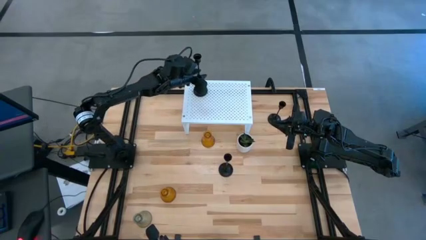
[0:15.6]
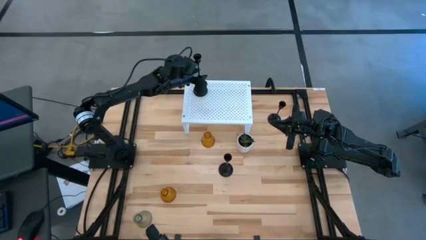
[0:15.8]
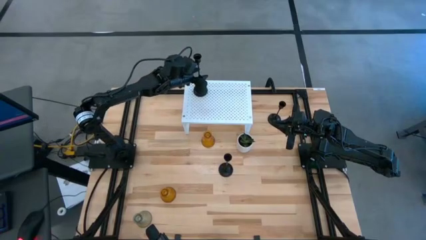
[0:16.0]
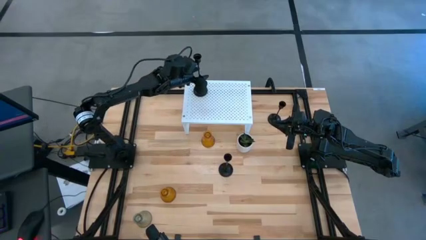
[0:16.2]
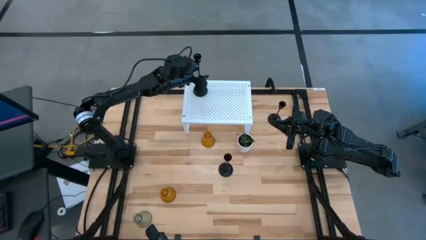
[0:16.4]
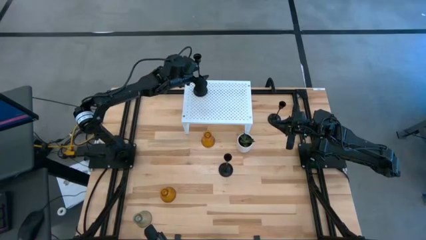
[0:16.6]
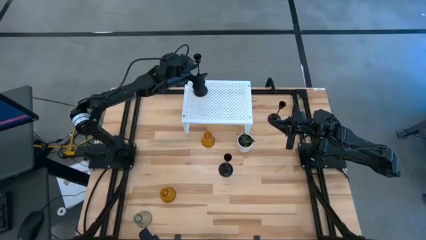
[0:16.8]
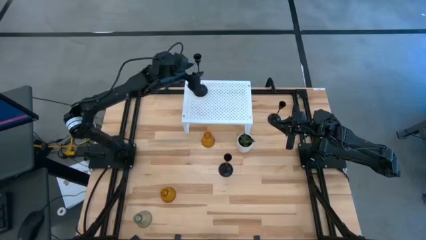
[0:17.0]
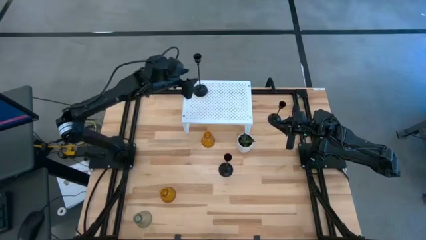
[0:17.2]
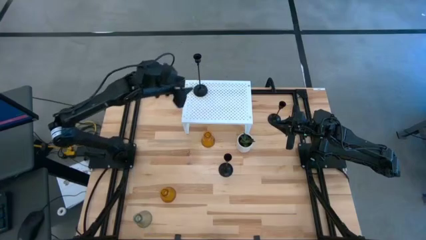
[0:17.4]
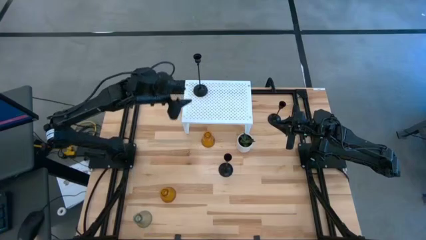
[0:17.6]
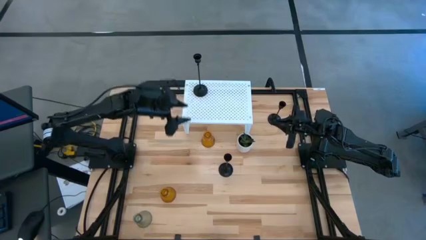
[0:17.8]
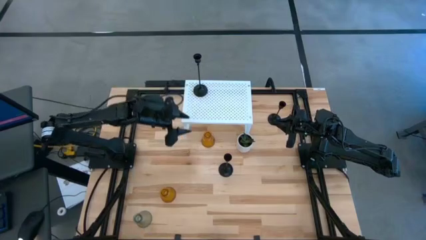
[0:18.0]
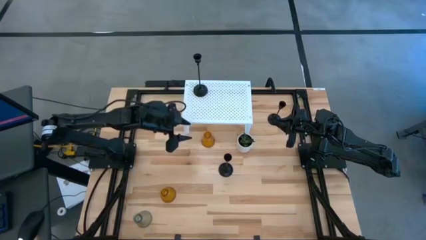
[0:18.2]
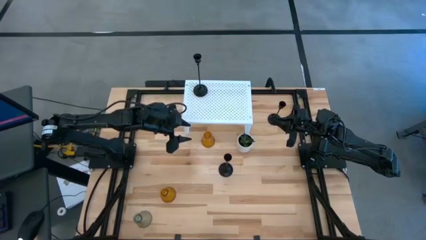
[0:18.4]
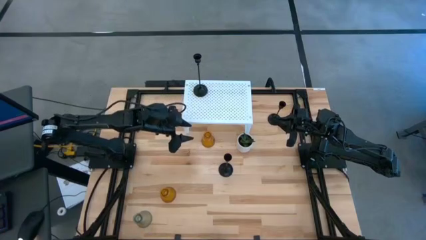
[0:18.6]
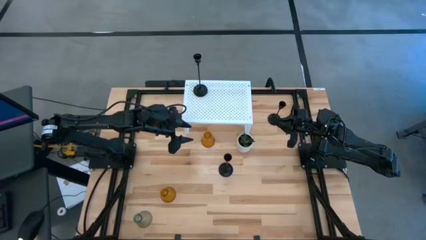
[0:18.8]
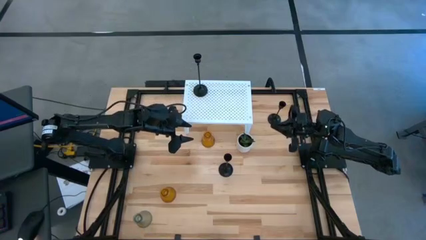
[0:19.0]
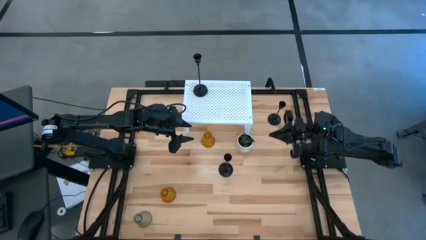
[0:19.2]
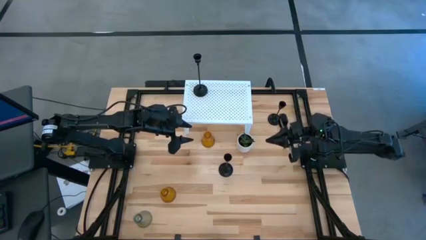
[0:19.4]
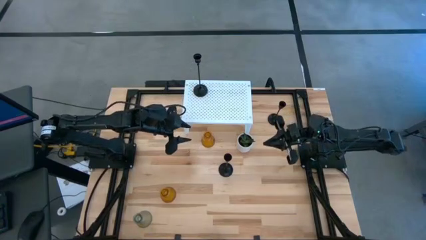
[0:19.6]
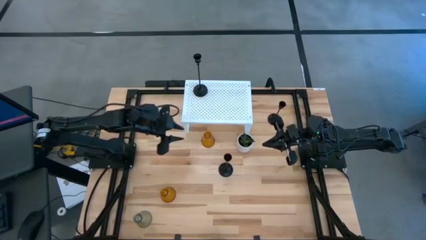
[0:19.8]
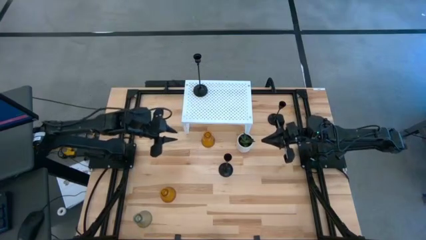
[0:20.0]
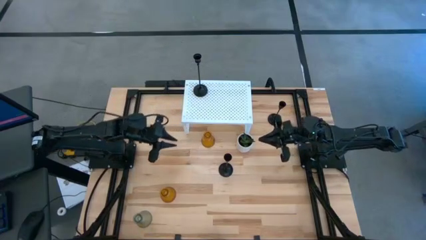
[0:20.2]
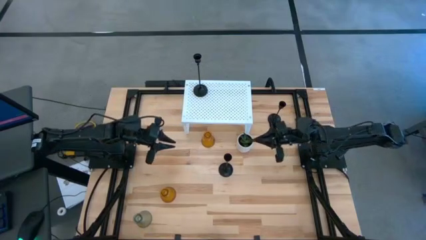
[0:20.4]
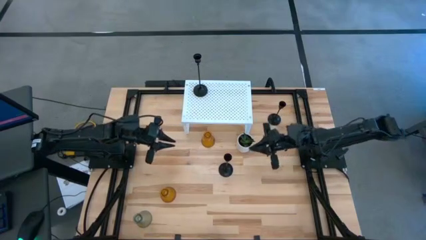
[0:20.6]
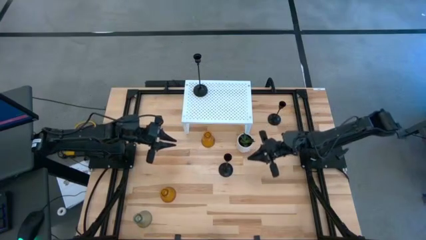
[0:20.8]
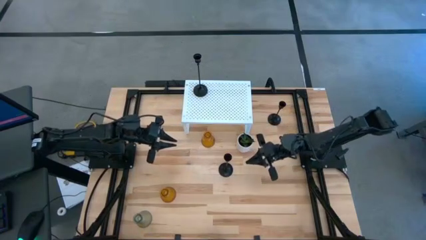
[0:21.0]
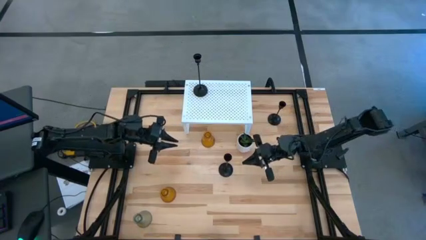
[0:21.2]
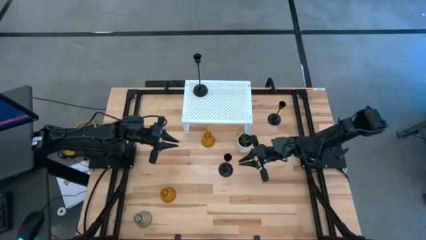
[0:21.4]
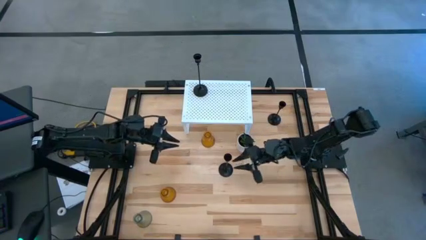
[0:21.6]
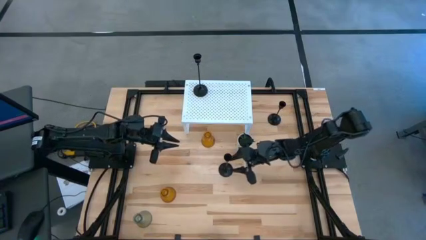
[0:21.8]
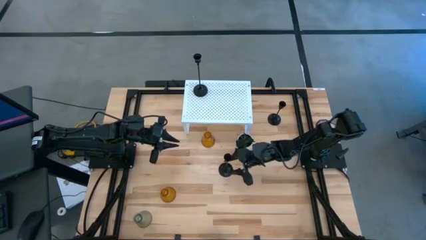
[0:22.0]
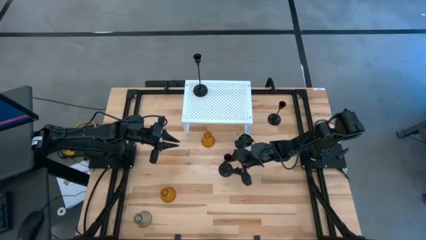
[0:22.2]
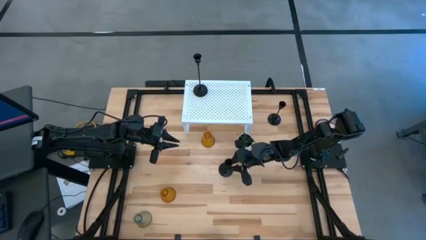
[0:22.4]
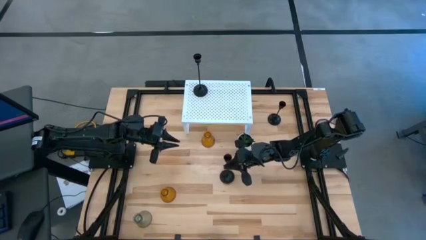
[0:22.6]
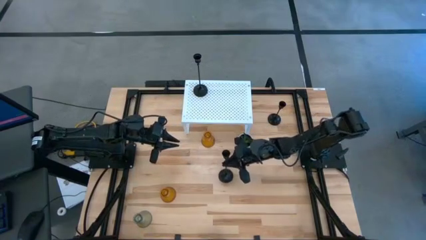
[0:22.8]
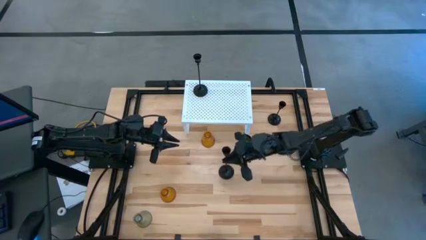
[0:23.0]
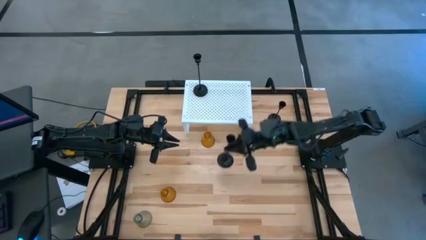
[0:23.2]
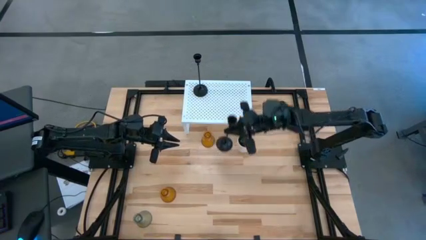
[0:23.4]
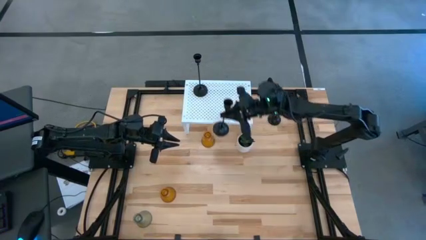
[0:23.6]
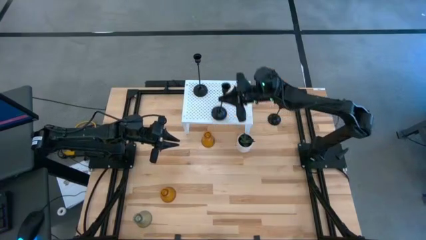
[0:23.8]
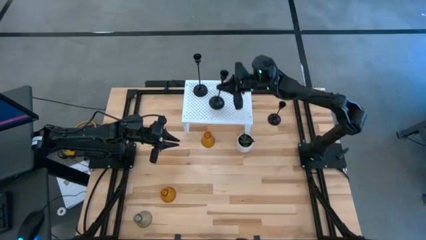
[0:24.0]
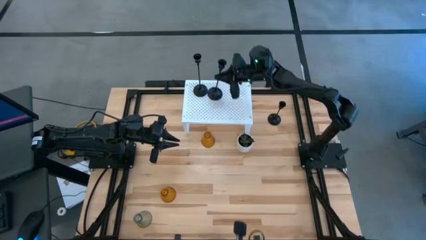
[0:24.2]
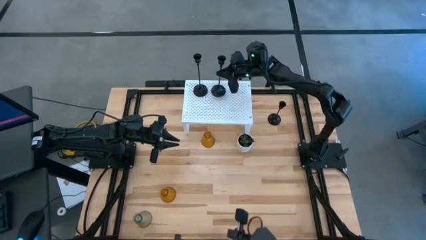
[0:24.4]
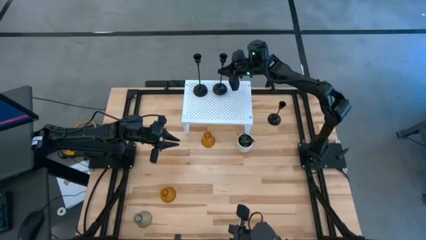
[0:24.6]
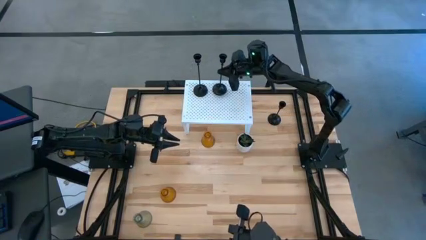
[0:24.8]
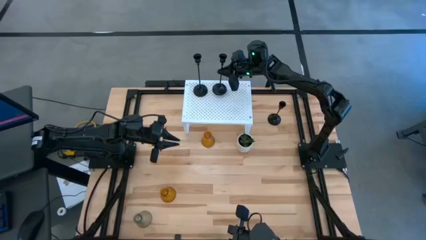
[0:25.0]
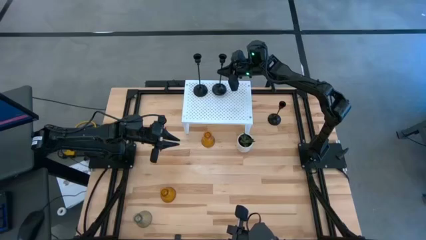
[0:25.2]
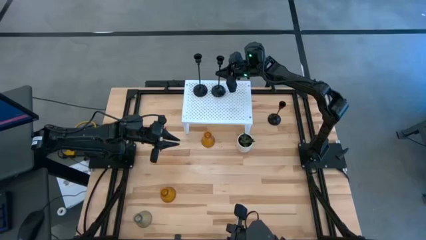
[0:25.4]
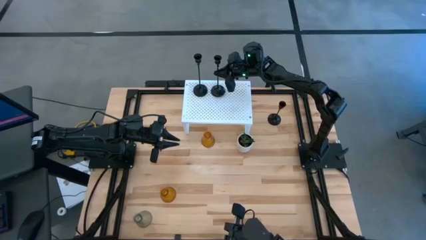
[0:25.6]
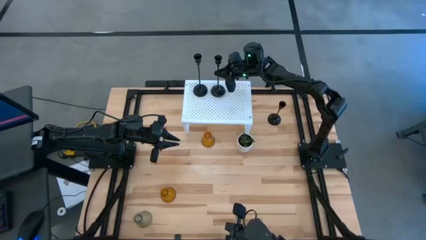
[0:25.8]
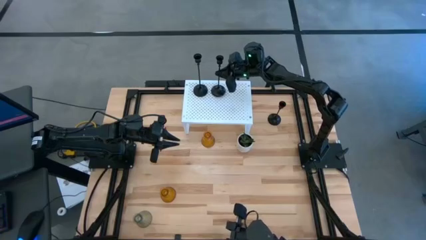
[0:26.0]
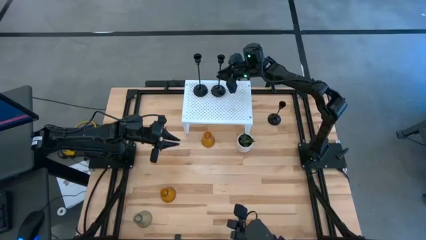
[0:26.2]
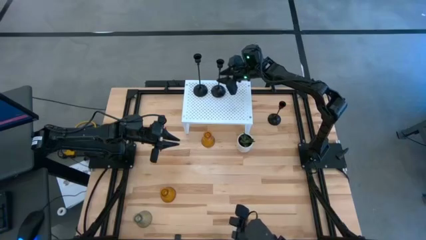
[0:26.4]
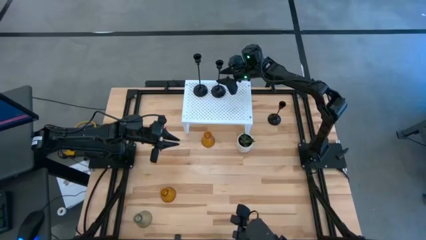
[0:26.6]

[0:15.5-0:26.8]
Task: Pick & Place candle stick holders
Put the bottom black candle holder on the shelf

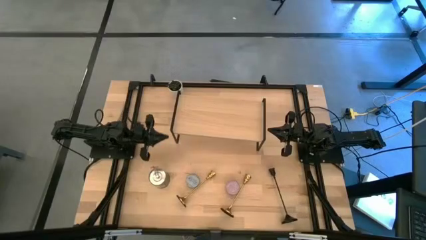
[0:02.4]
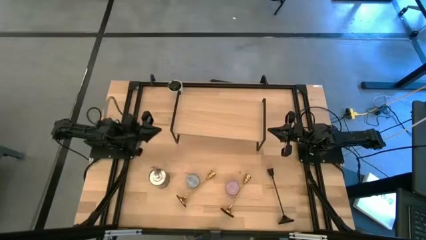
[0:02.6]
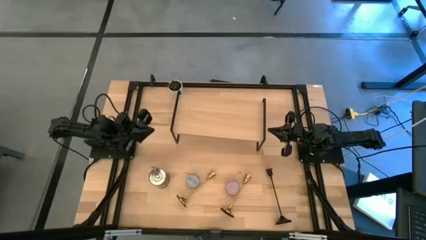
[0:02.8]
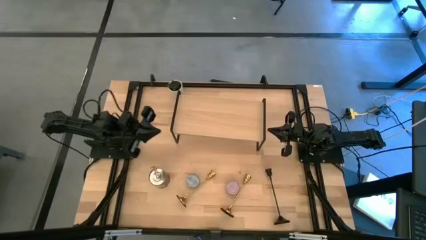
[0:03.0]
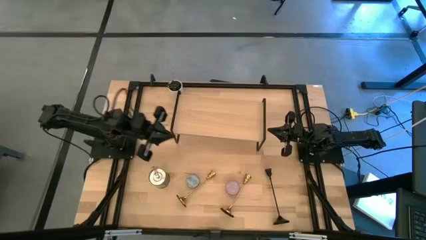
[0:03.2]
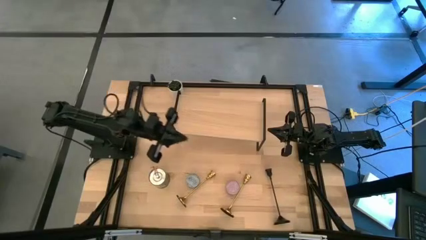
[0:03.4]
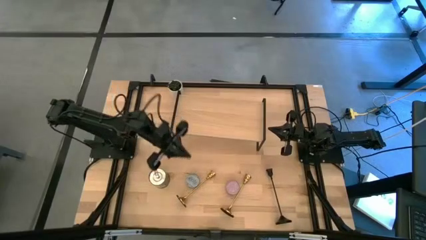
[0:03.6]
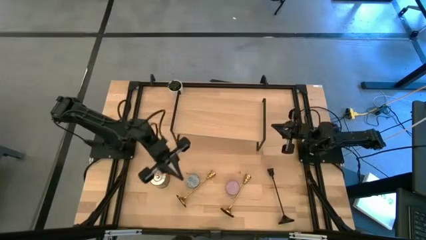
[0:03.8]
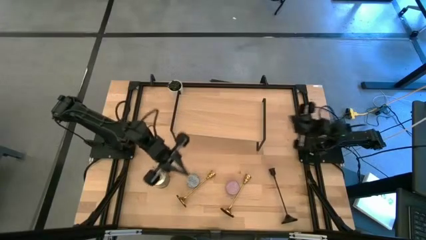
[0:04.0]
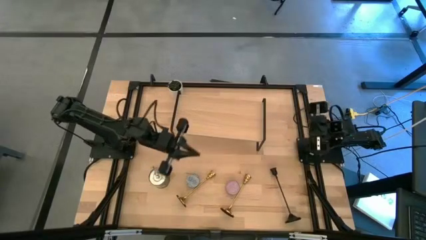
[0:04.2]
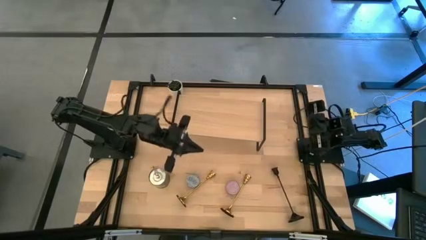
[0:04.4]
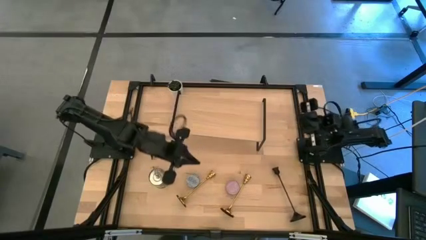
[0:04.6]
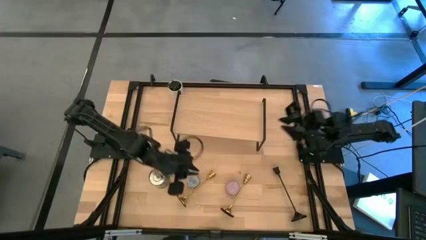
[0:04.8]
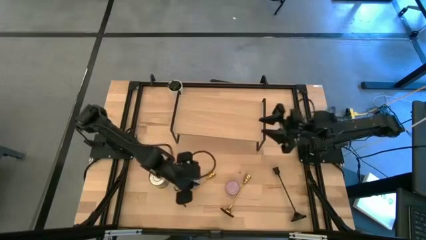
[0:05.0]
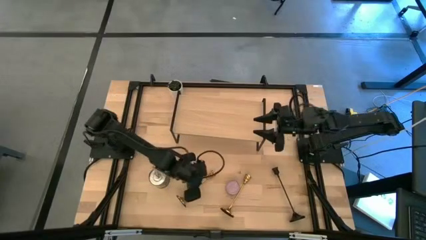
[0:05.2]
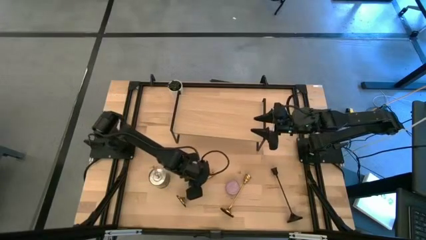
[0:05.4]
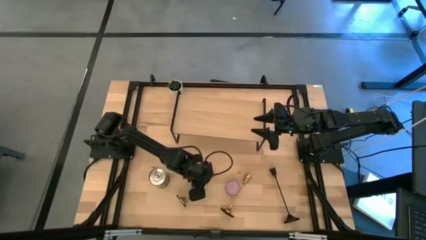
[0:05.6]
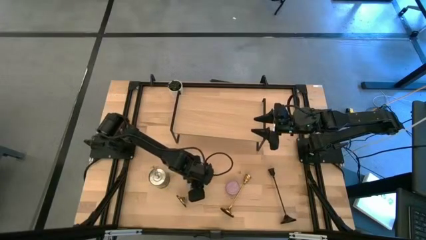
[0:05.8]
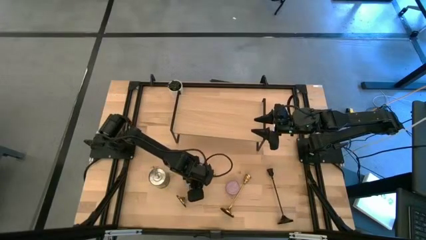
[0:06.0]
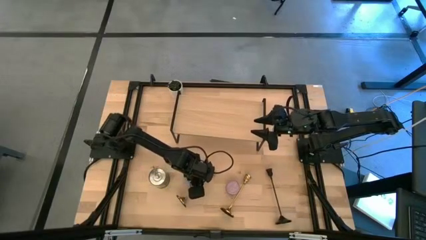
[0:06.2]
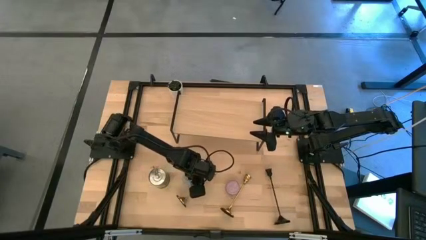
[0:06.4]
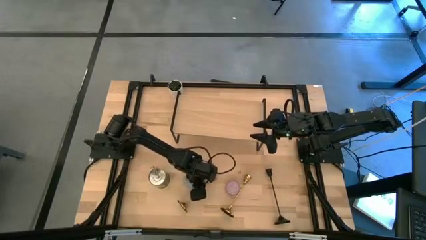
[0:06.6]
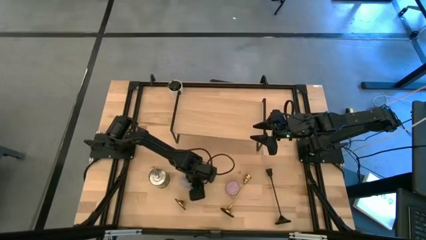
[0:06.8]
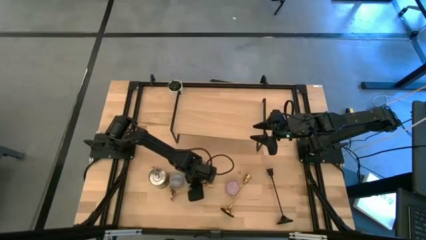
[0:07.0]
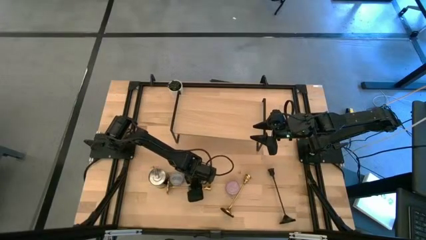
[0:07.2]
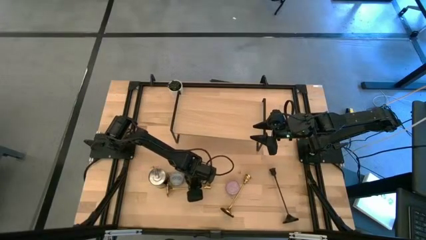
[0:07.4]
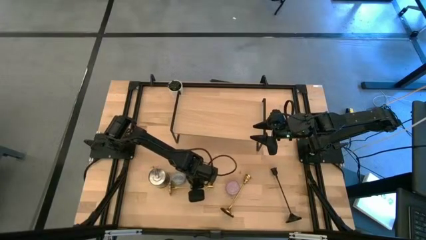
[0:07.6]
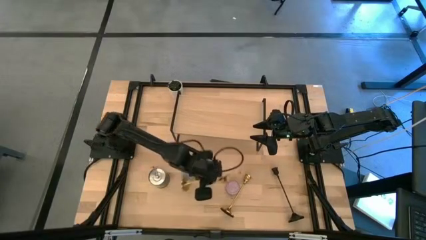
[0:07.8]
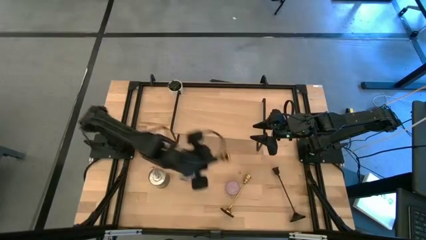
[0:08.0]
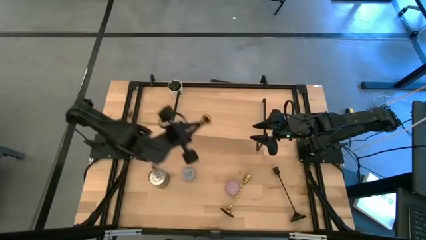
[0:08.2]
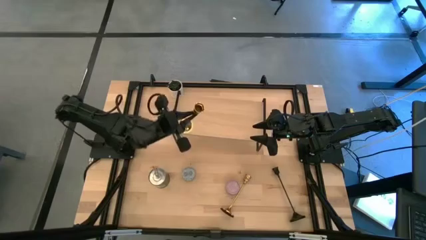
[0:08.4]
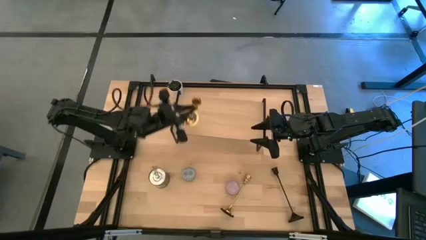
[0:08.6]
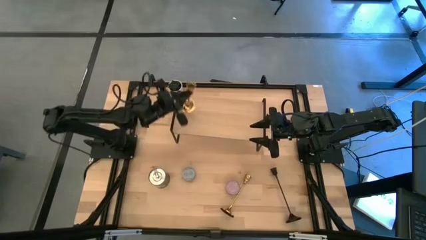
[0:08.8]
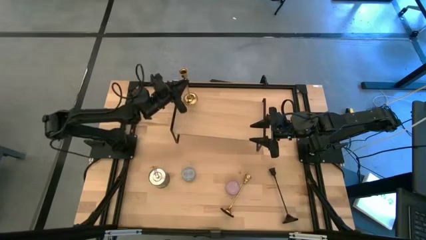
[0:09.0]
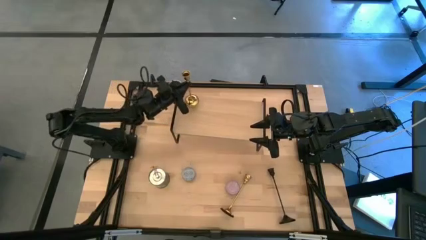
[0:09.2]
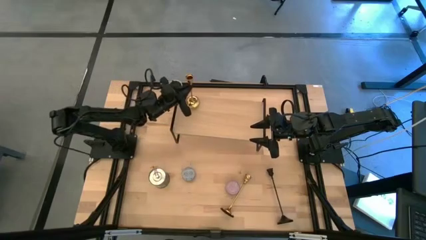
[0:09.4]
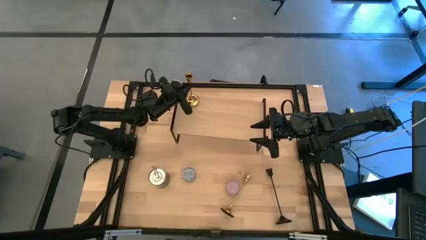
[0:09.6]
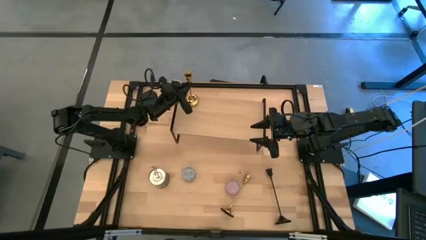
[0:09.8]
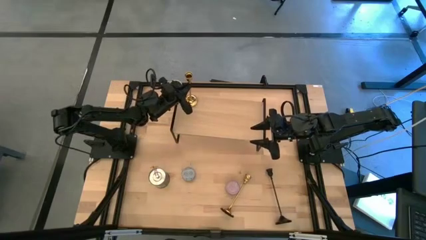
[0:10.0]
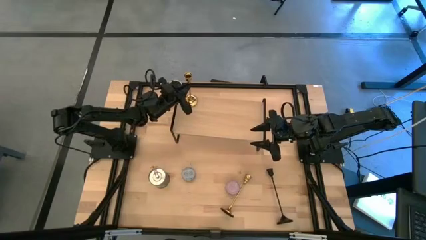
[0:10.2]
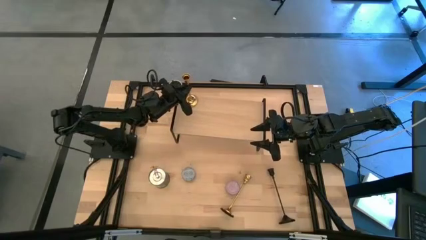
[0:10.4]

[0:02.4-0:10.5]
Task: Pick & Place candle stick holders
Put the left gold candle holder on the shelf
